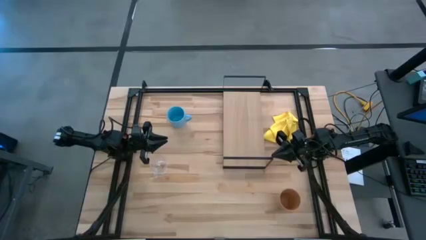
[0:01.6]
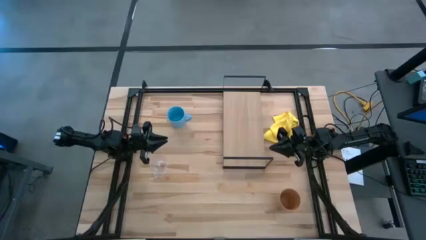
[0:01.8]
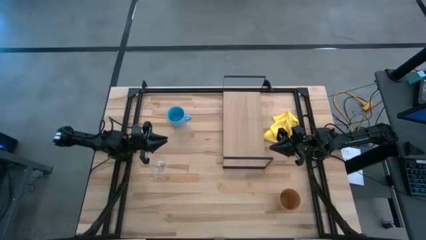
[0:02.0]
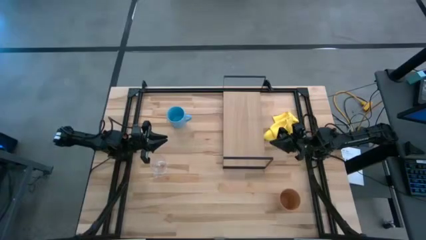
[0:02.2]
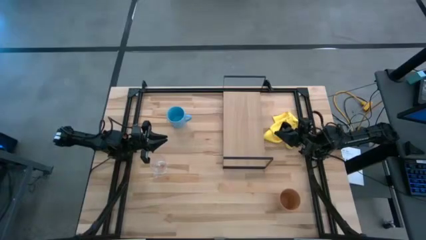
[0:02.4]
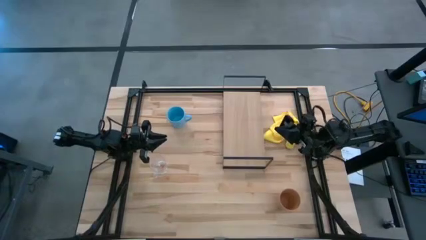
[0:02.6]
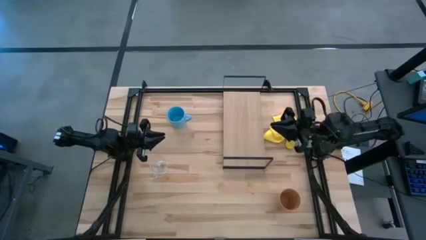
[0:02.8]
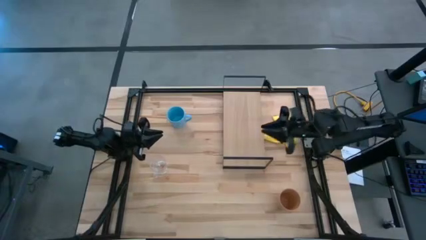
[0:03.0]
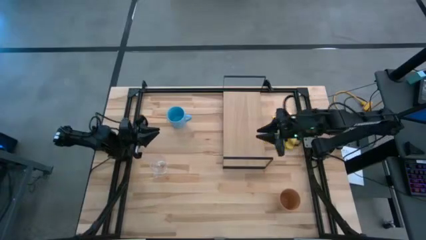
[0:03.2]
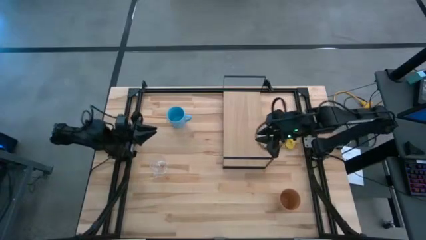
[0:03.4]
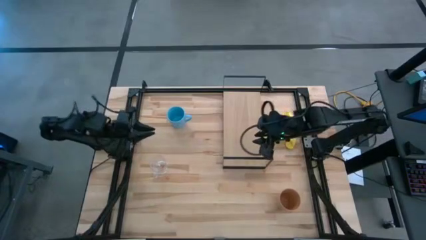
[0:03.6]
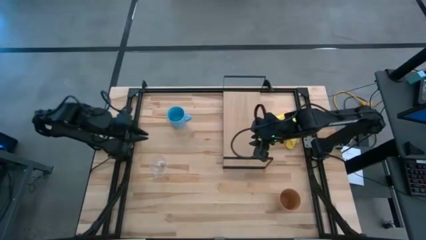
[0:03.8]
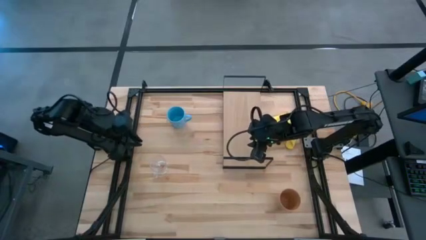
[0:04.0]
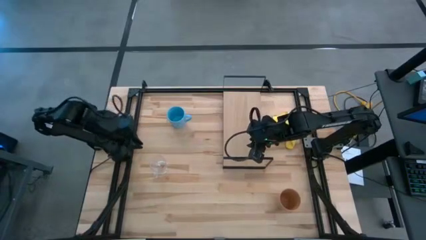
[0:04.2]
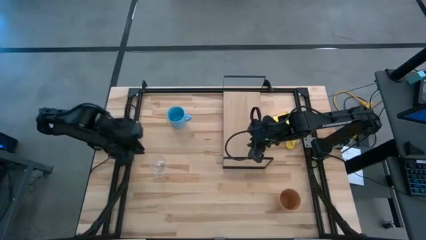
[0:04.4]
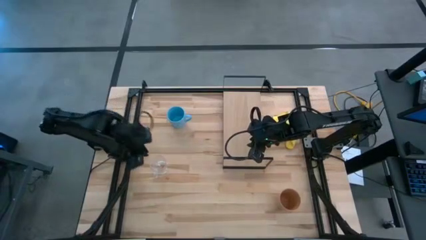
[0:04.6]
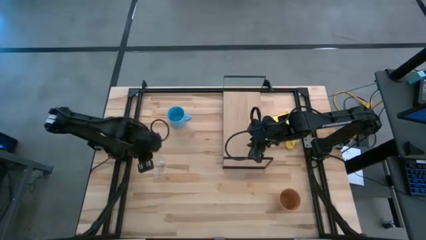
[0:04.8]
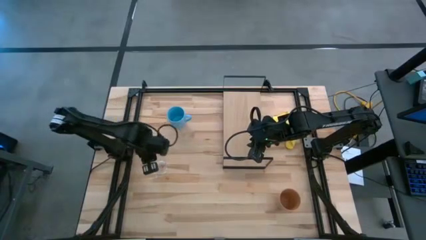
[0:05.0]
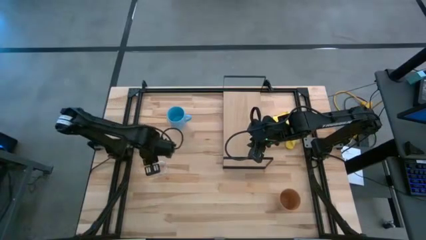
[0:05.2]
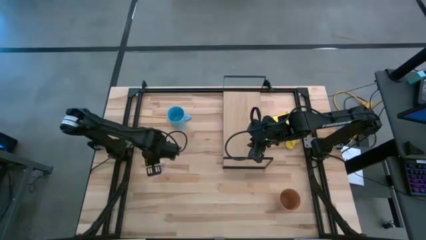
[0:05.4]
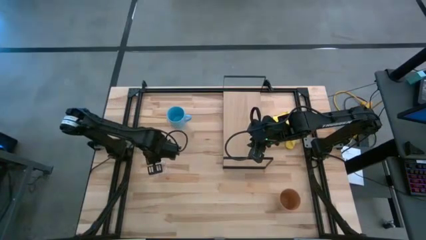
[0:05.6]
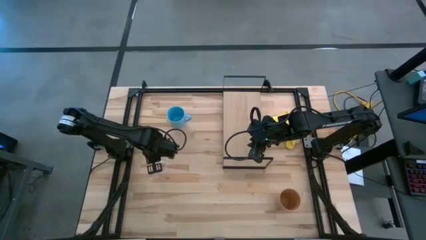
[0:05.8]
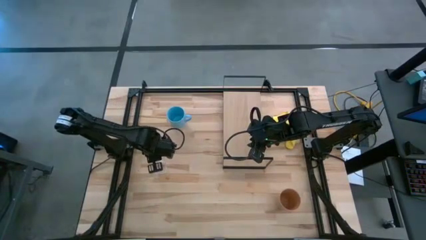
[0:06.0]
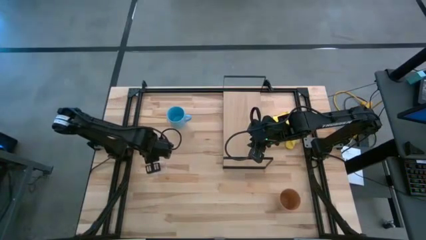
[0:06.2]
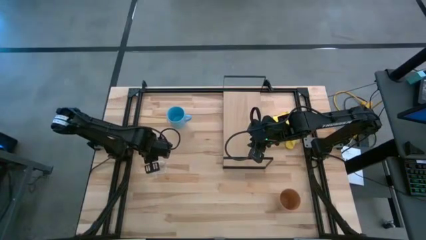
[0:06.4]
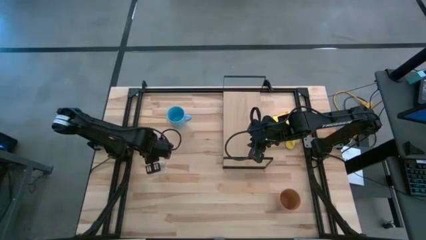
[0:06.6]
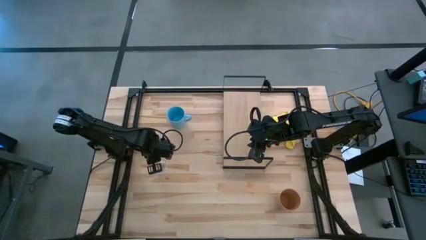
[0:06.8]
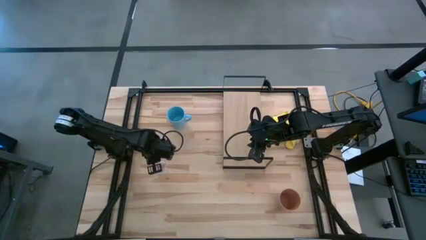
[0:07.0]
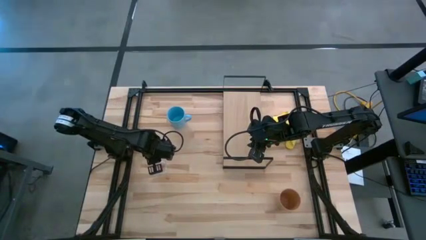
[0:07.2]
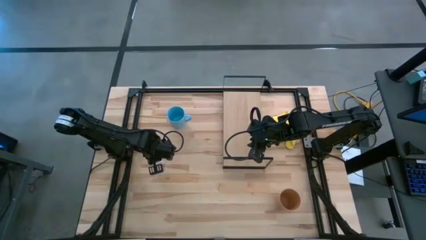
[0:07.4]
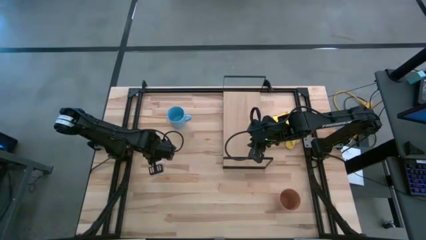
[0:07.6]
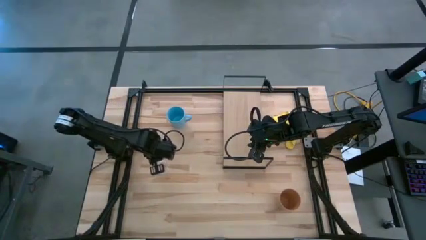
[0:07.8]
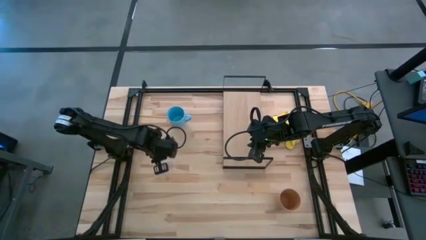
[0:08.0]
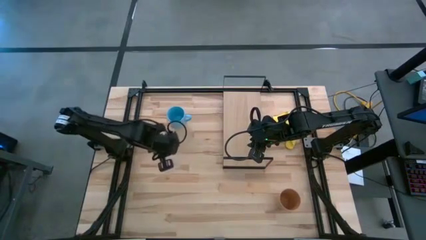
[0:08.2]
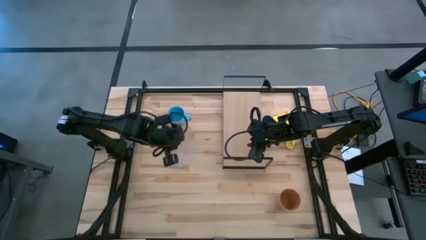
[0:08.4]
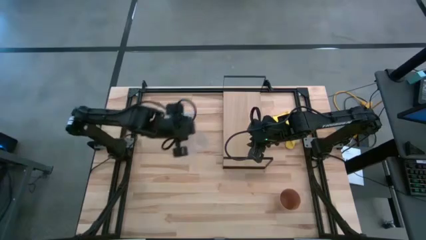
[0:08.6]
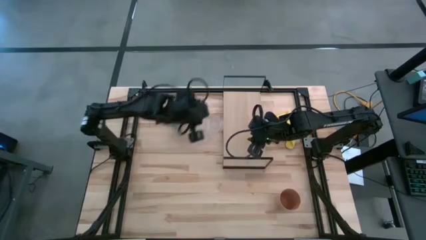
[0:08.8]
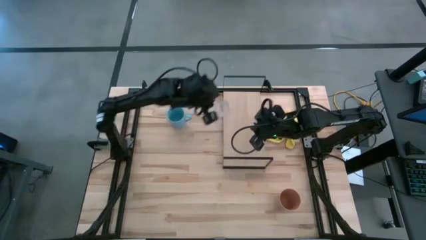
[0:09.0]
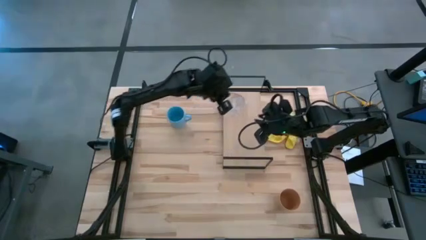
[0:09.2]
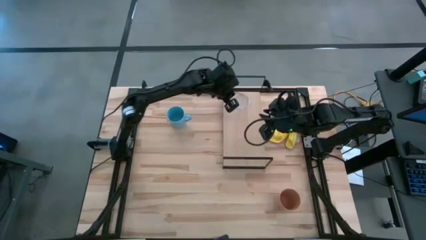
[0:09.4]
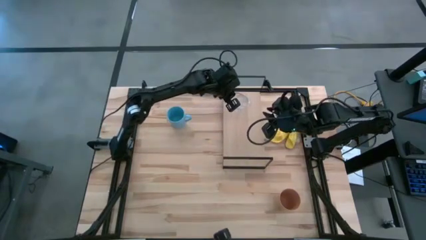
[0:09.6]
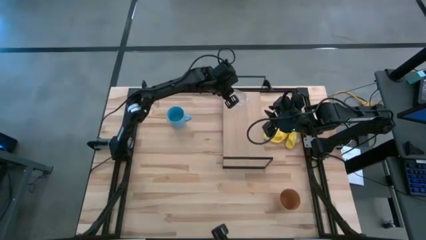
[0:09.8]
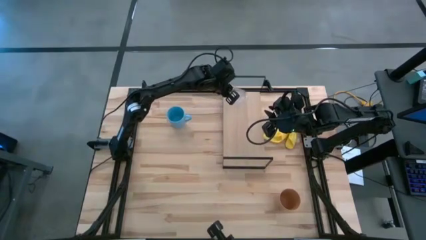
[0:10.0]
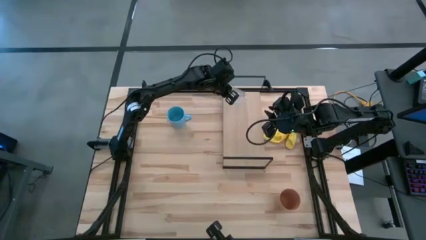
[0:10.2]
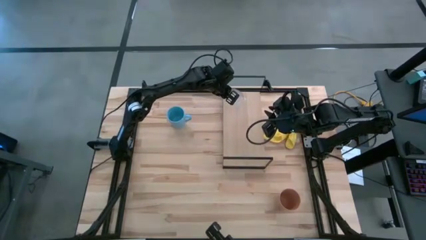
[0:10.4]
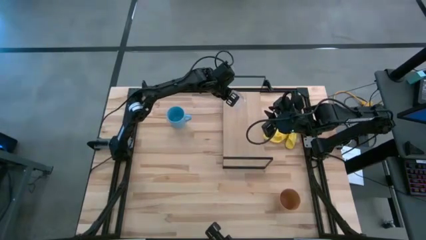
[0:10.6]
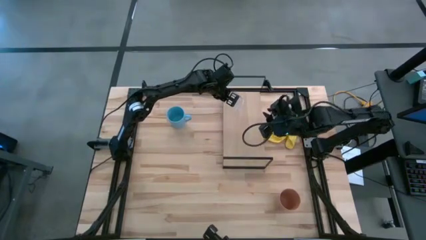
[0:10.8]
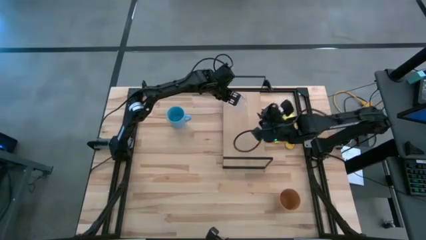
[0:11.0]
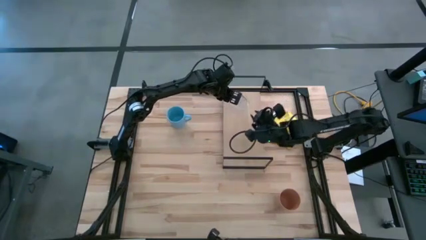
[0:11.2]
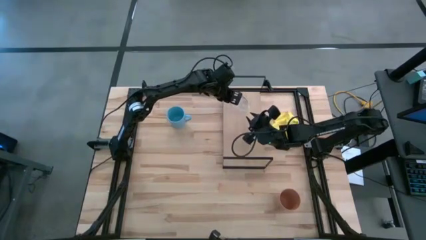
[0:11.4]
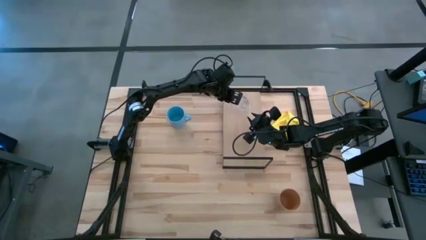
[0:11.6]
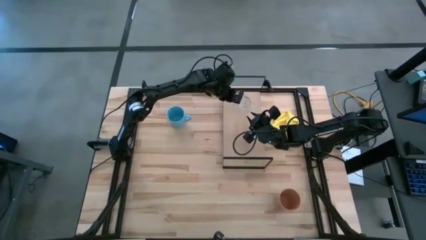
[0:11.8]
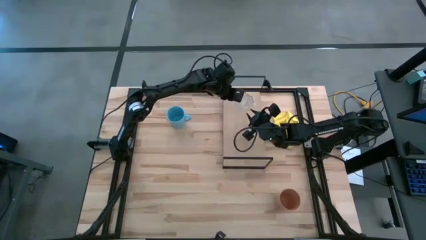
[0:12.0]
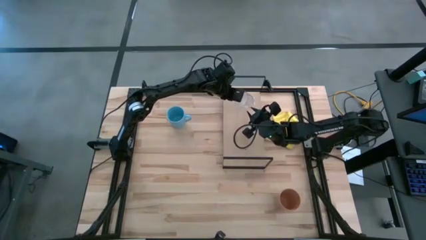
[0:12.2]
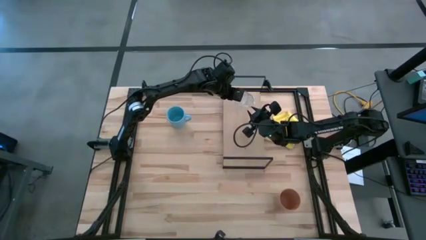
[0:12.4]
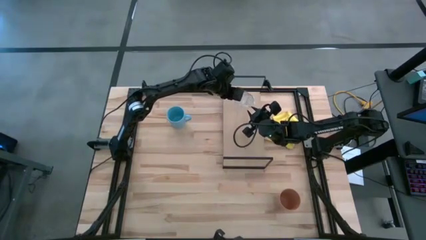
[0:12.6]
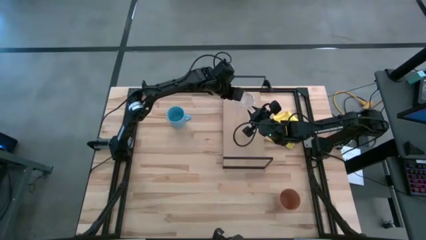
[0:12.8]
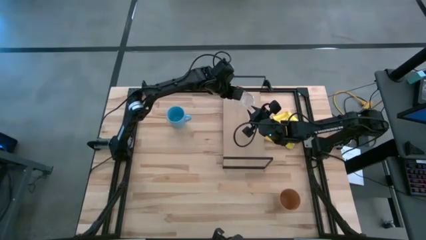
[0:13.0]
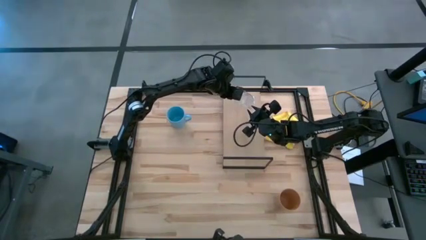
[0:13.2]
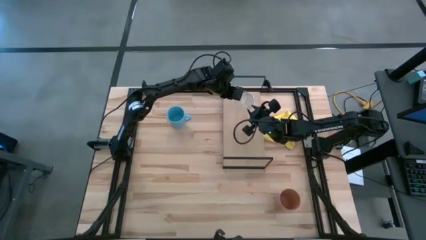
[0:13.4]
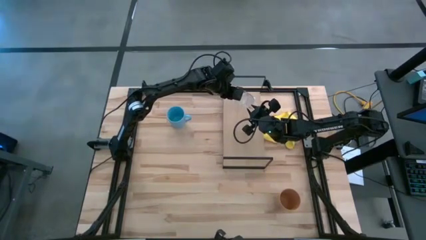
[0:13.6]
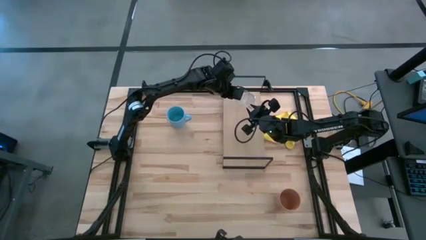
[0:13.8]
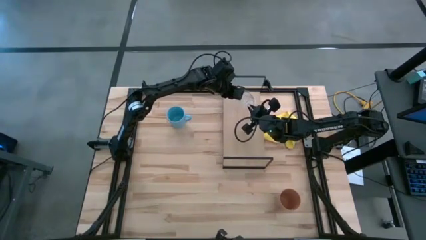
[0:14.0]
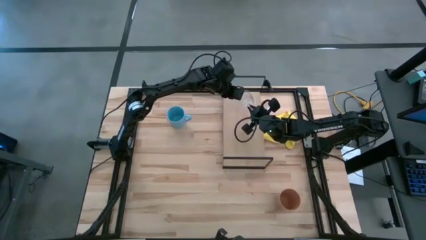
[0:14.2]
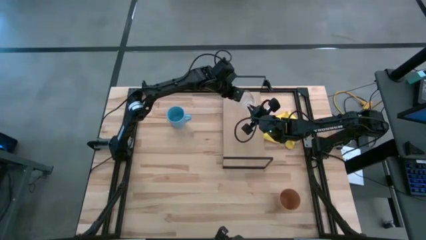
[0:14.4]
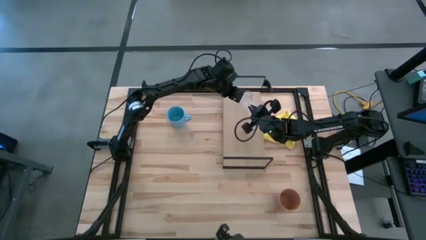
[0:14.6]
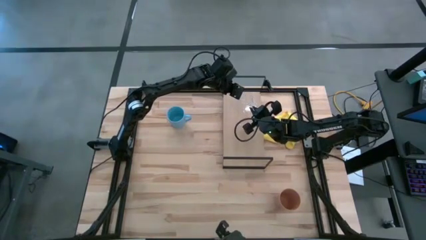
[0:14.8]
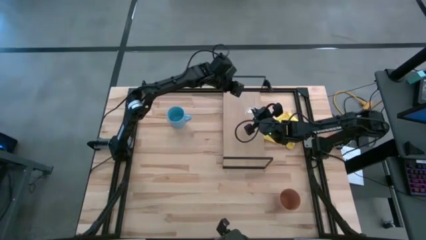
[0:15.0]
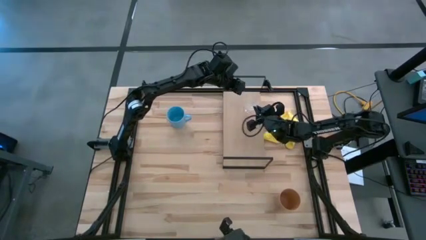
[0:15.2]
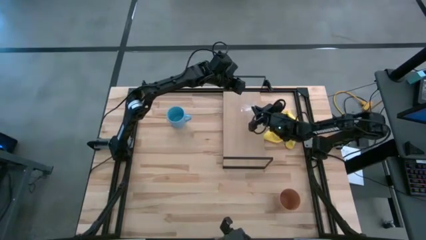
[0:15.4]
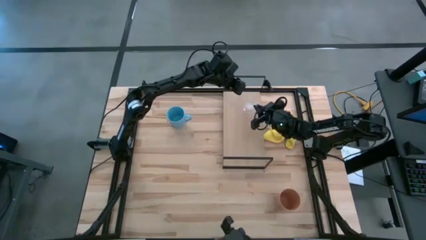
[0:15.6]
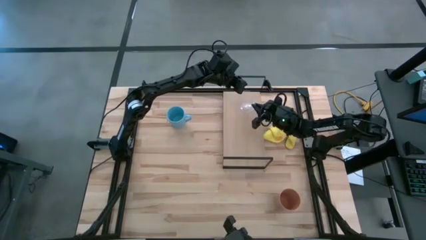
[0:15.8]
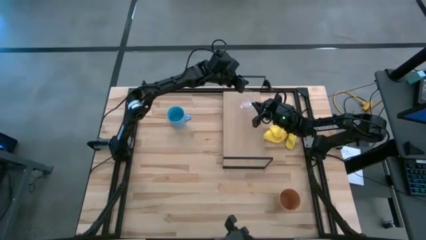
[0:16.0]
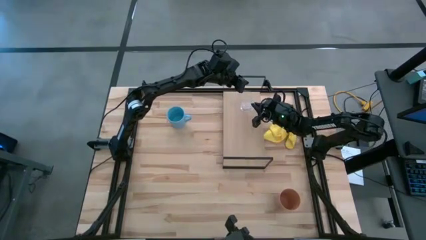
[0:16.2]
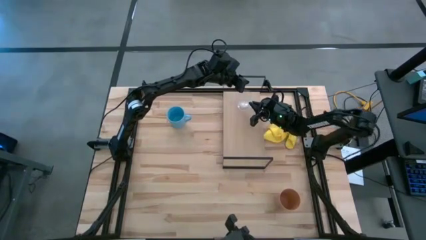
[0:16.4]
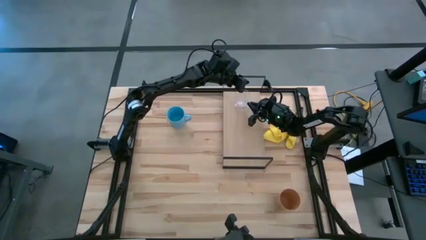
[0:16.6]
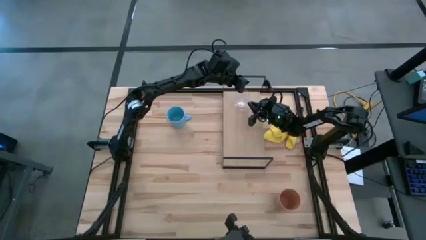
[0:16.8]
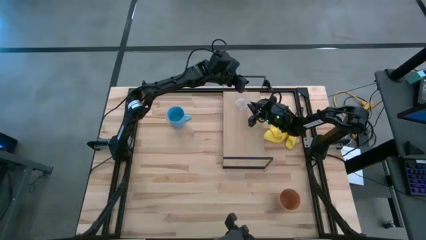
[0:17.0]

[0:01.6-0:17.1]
Task: Stack small to large cups/mugs on shelf
Put the transparent mug on the shelf
